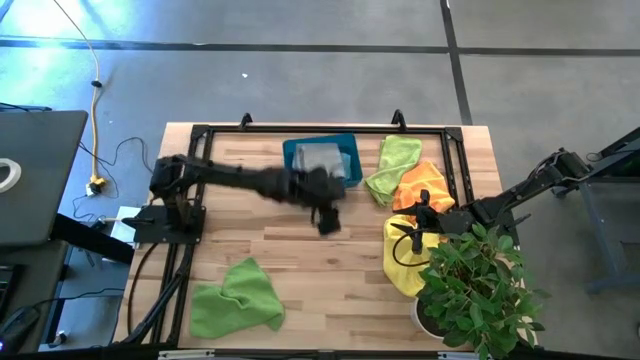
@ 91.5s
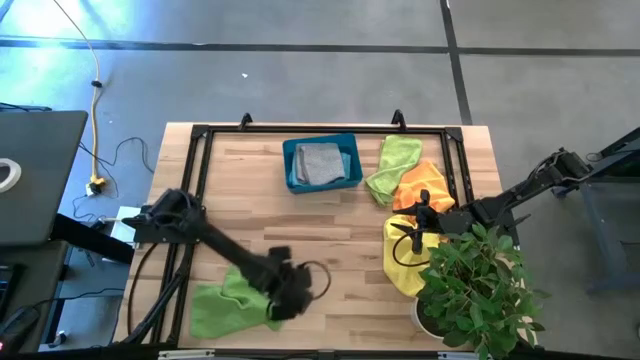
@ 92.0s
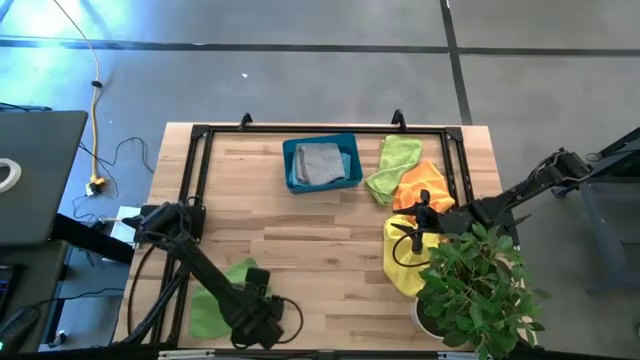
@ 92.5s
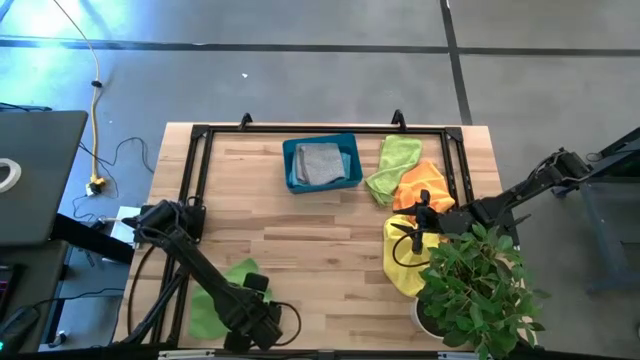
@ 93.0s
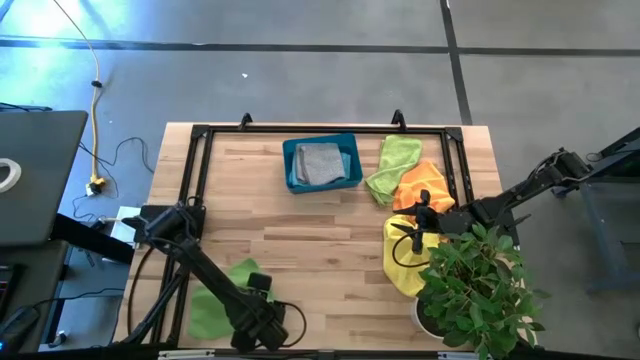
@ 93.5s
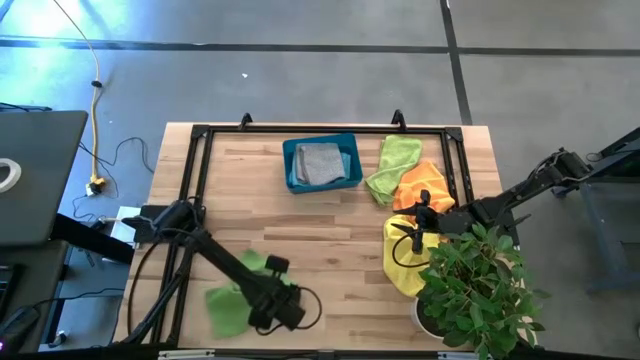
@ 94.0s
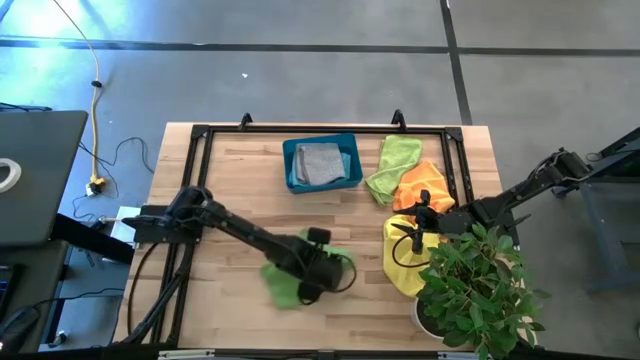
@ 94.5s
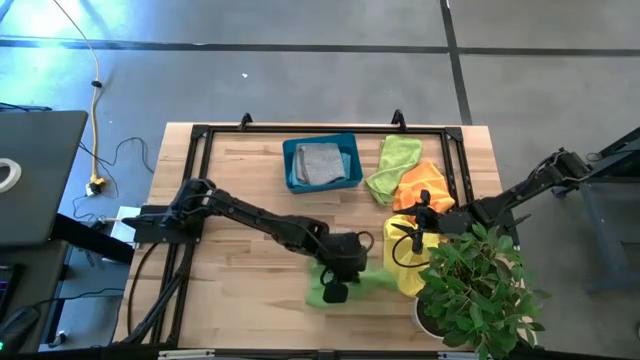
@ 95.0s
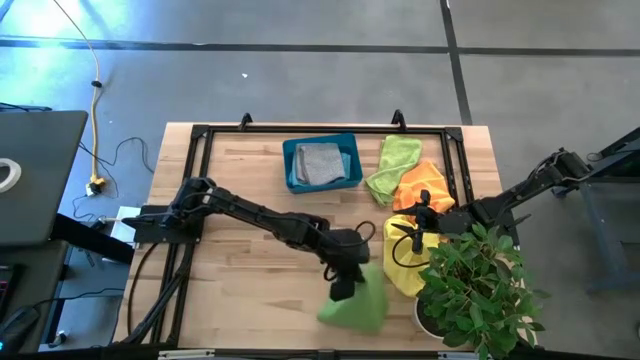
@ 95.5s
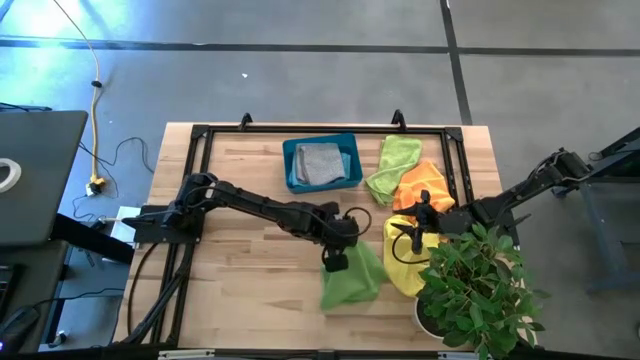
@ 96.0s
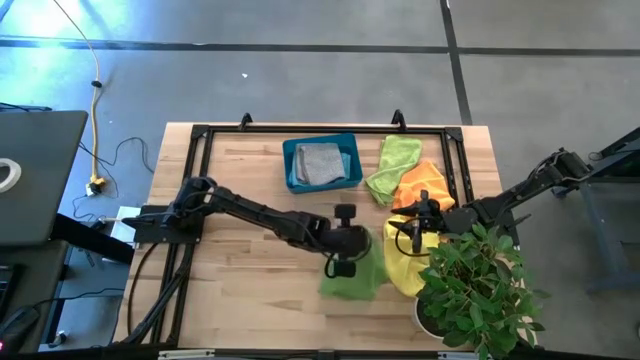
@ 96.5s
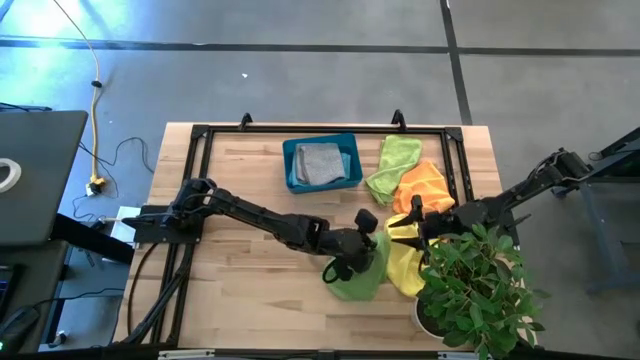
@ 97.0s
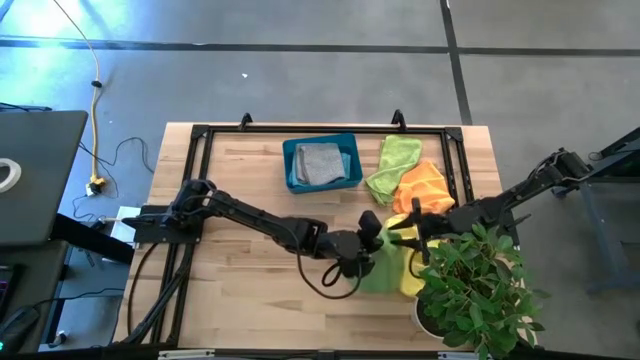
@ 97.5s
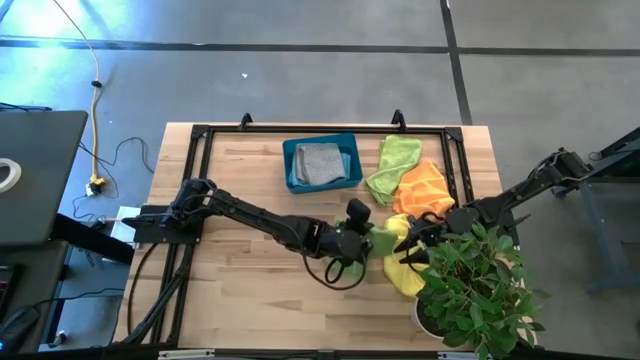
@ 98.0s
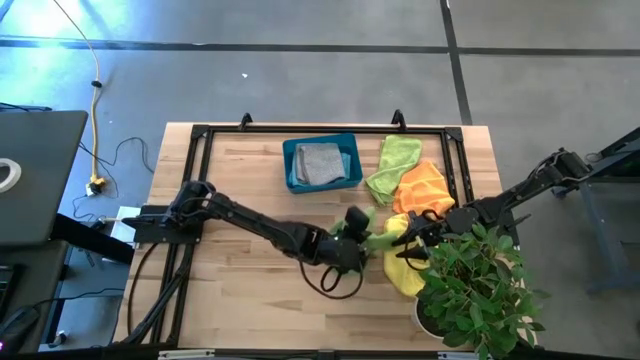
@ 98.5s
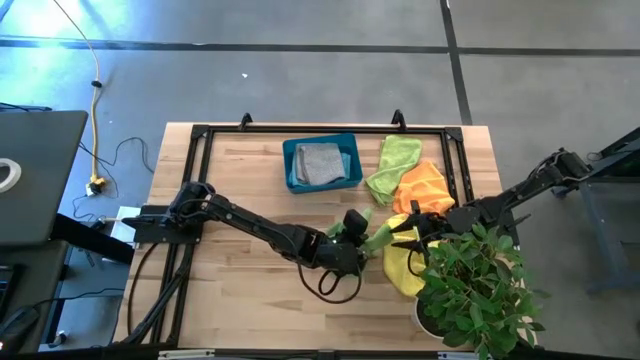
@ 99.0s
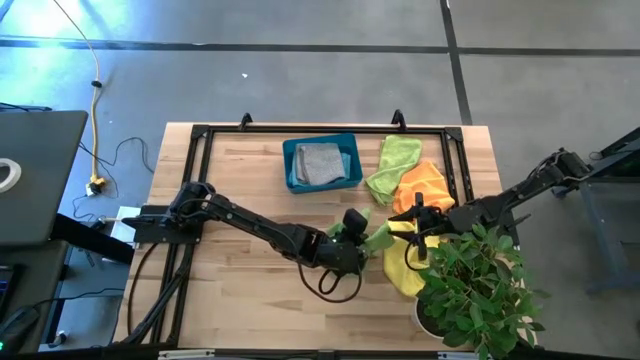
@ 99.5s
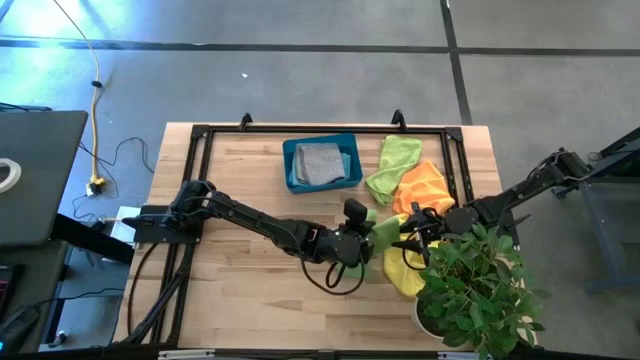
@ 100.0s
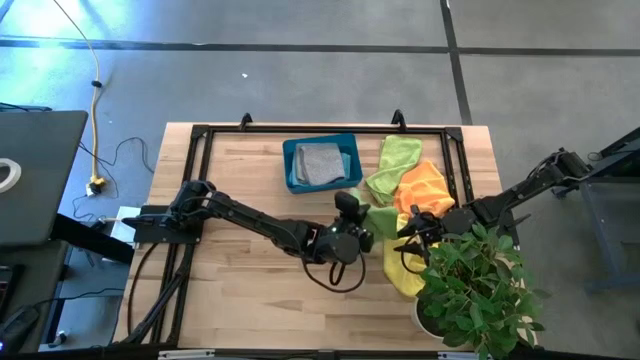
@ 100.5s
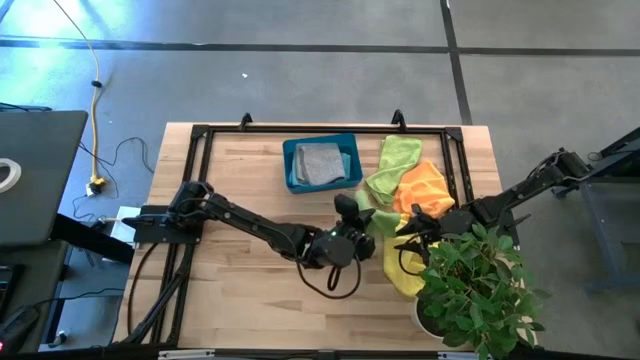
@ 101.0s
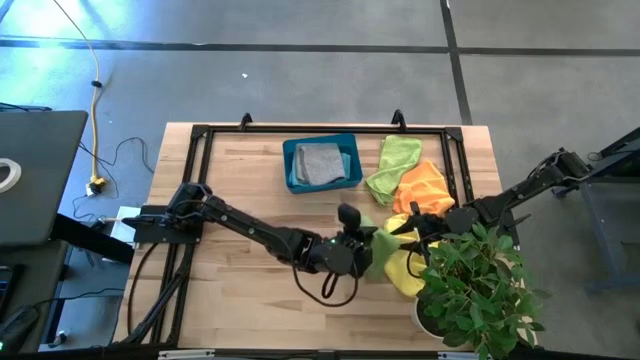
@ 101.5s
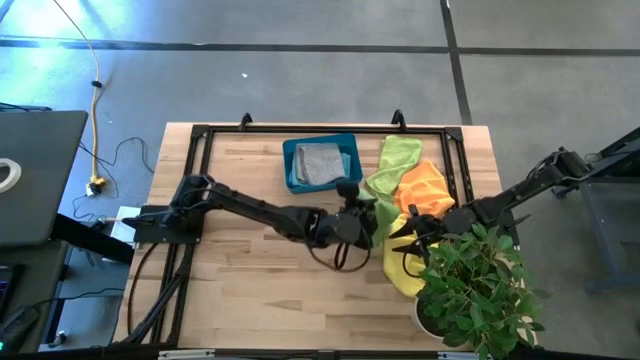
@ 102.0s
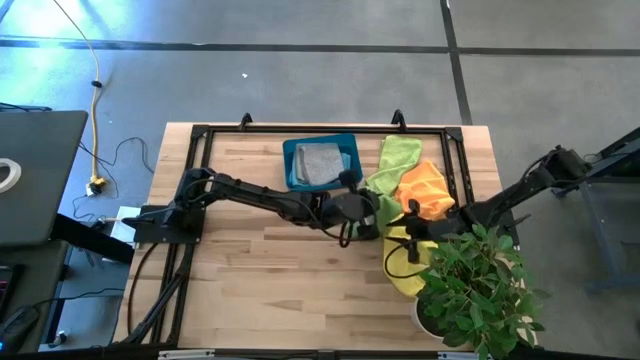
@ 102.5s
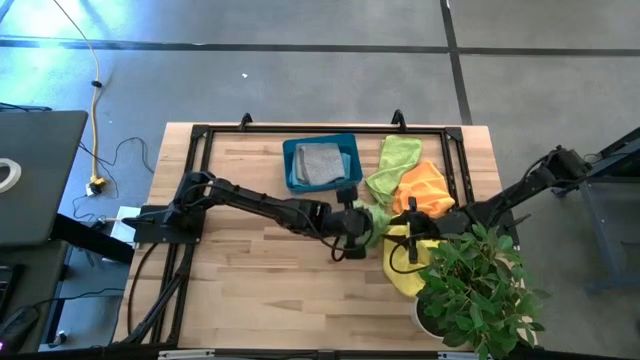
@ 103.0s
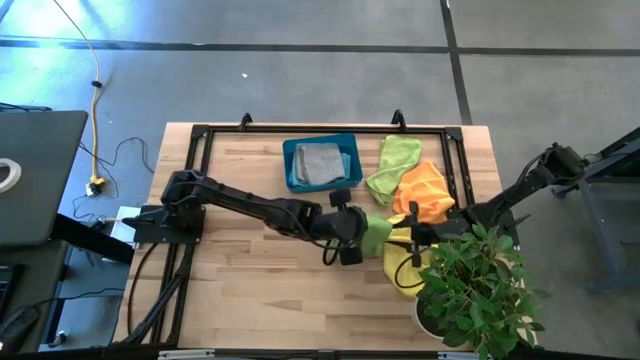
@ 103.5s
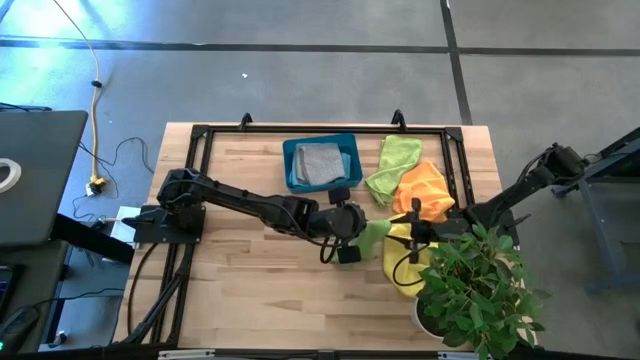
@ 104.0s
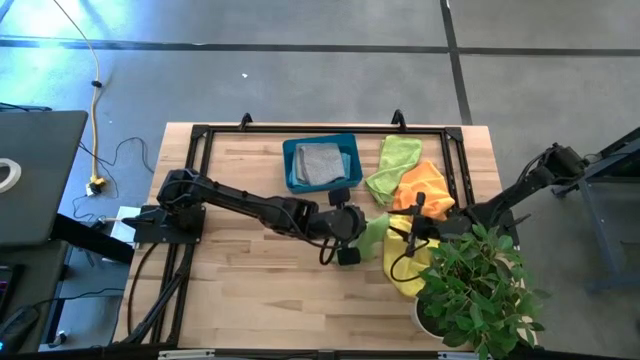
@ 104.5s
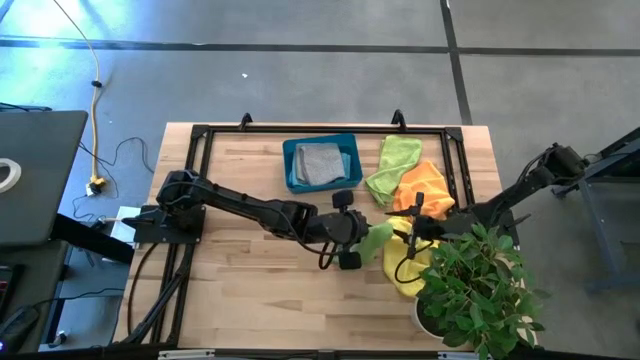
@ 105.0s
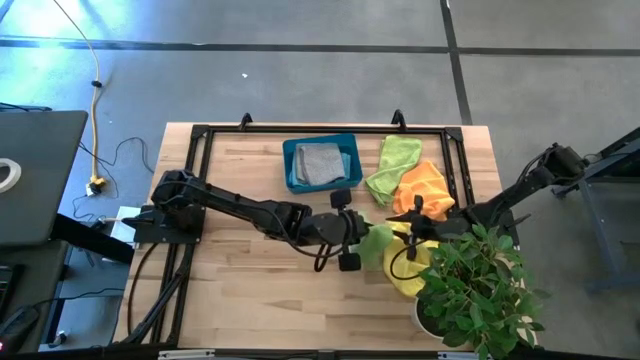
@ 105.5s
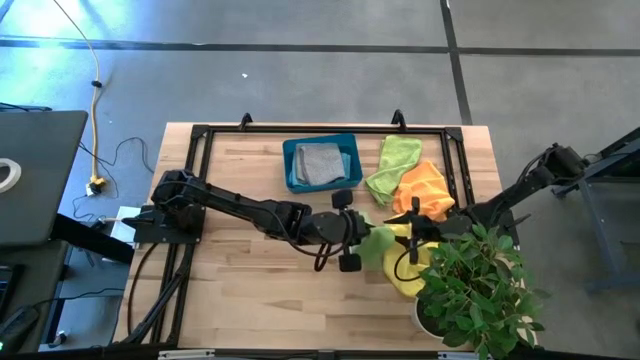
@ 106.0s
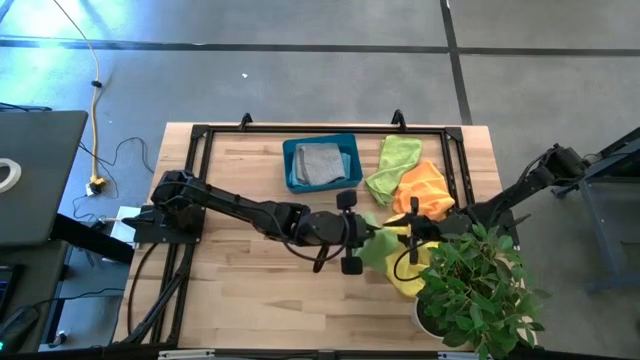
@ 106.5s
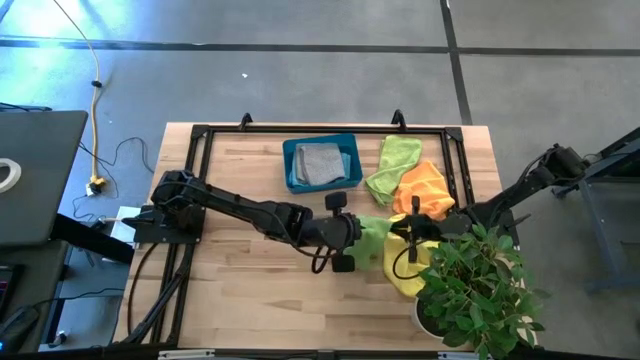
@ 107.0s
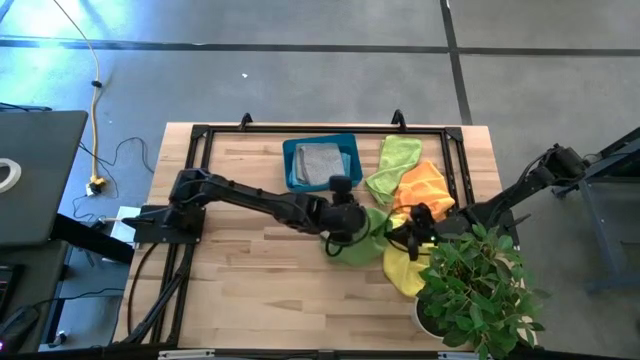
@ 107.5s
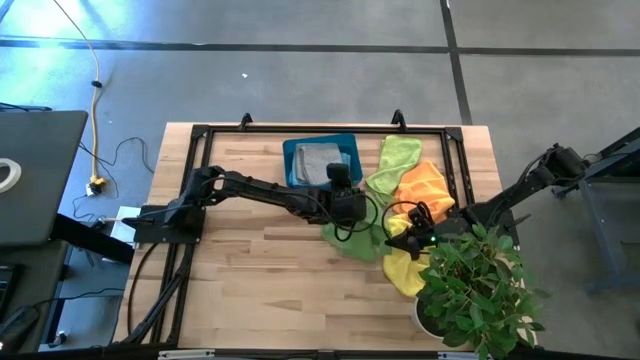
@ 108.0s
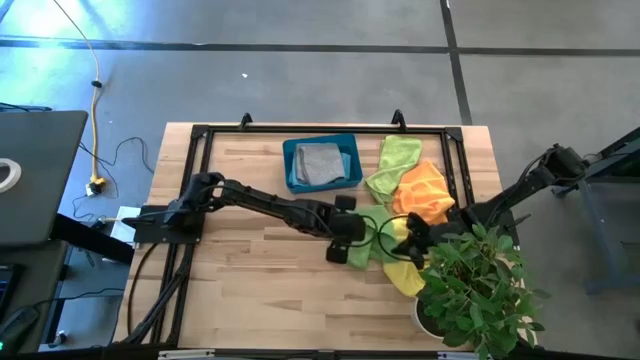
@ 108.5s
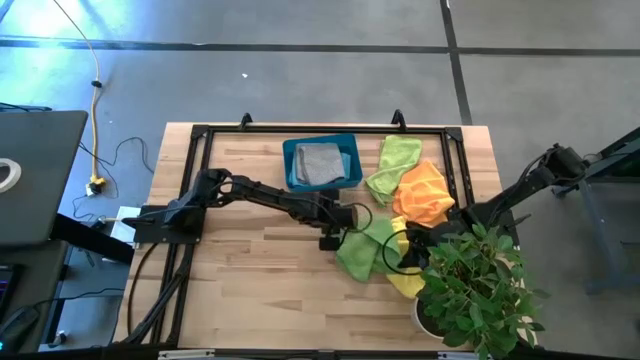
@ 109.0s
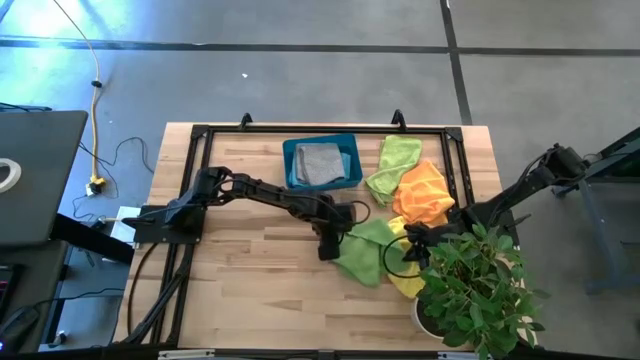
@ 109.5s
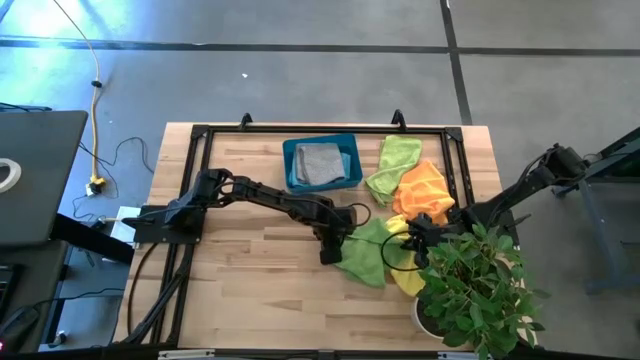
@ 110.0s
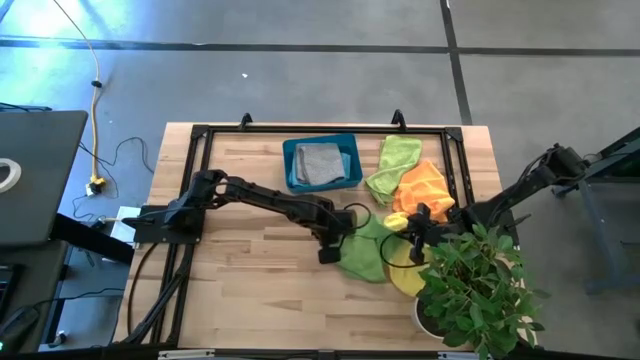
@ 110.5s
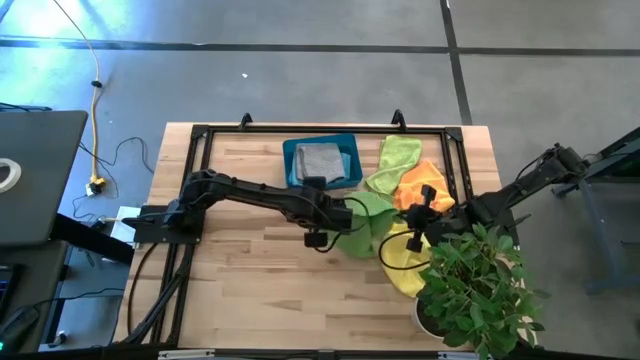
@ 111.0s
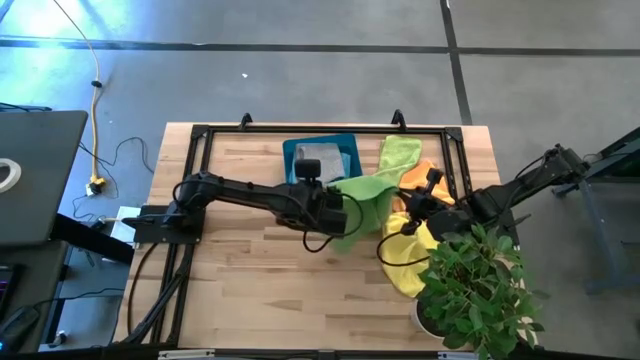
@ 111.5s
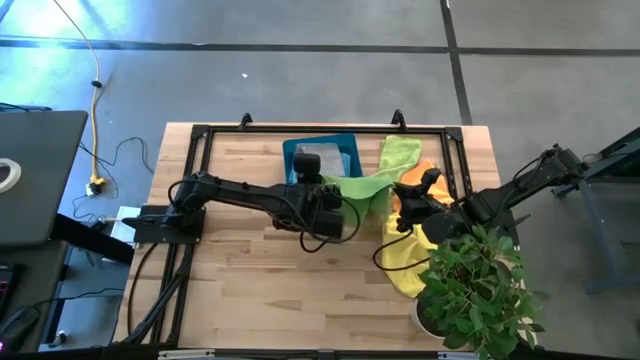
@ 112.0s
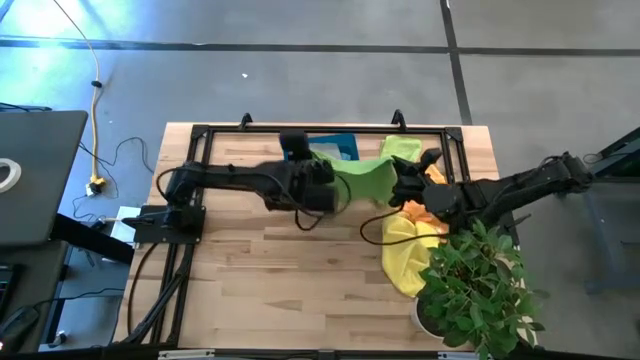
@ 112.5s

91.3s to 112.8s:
Task: Fold microfiber towels
Fold the bottom left green microfiber cloth
